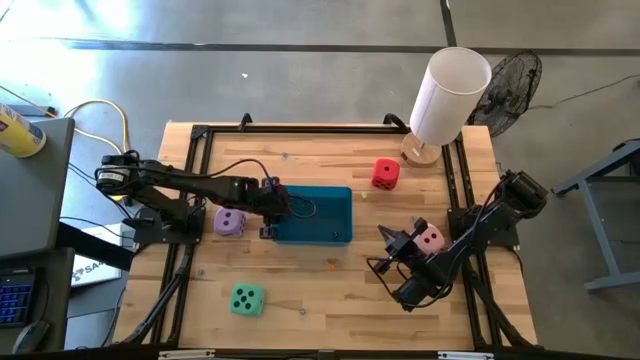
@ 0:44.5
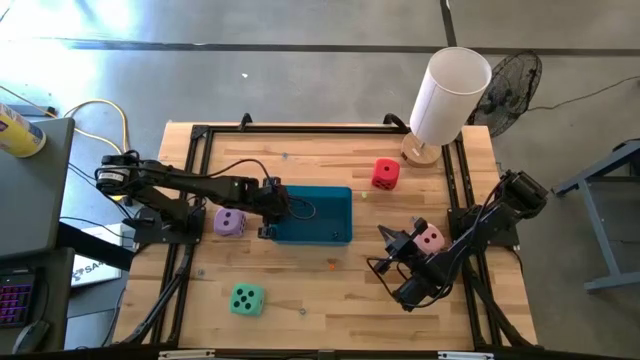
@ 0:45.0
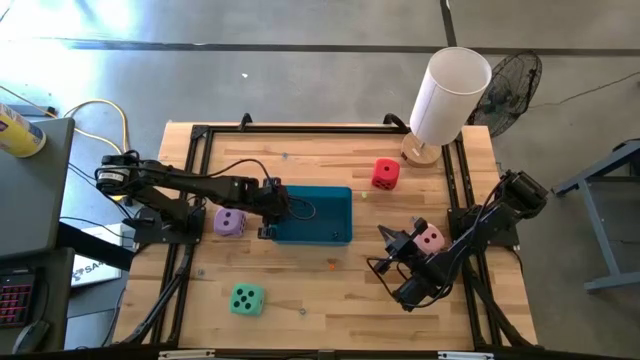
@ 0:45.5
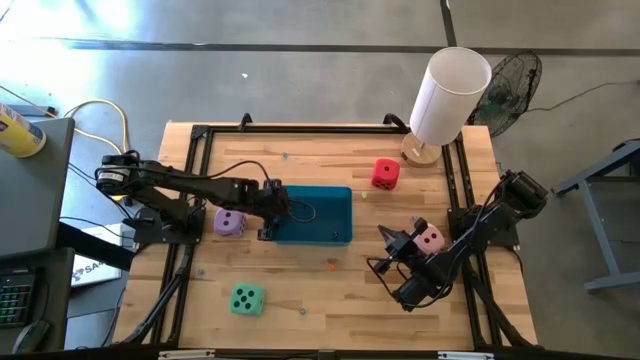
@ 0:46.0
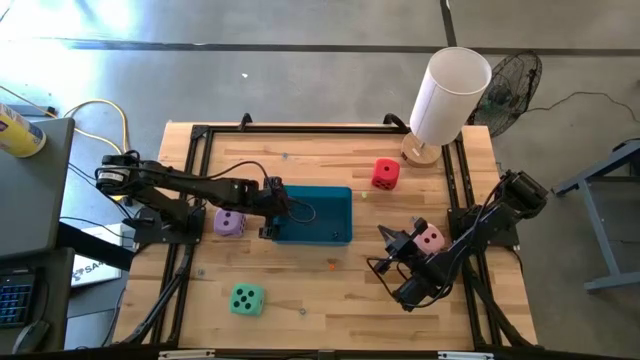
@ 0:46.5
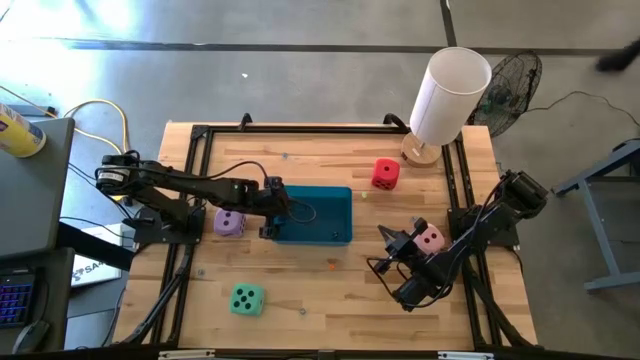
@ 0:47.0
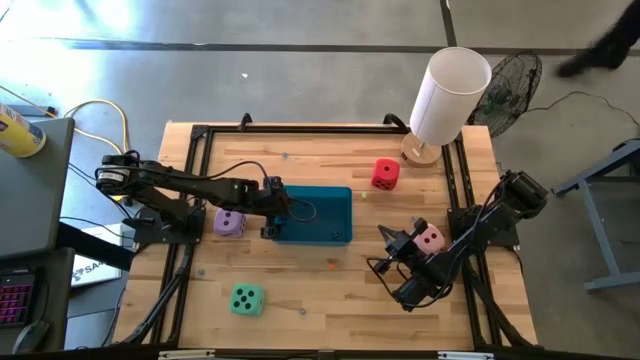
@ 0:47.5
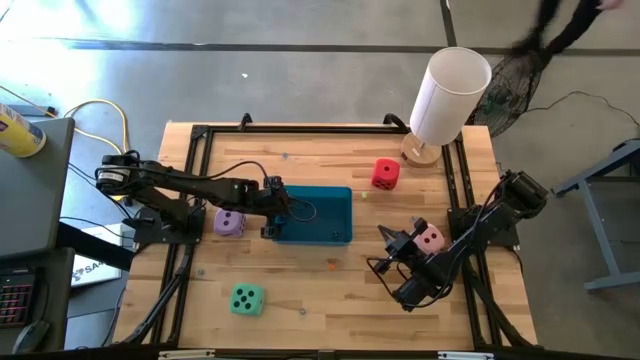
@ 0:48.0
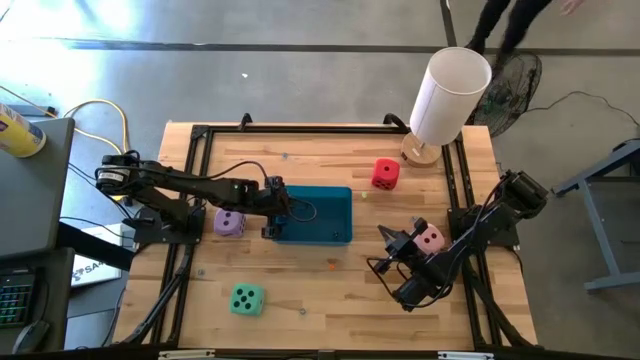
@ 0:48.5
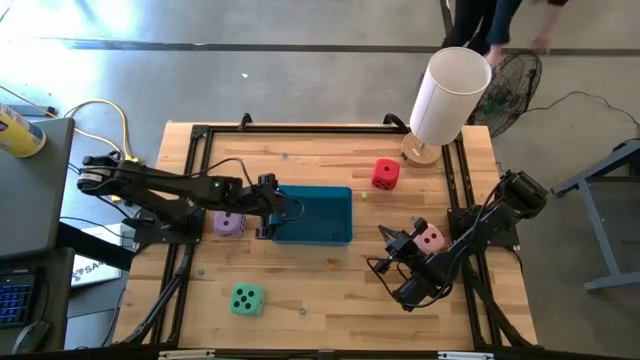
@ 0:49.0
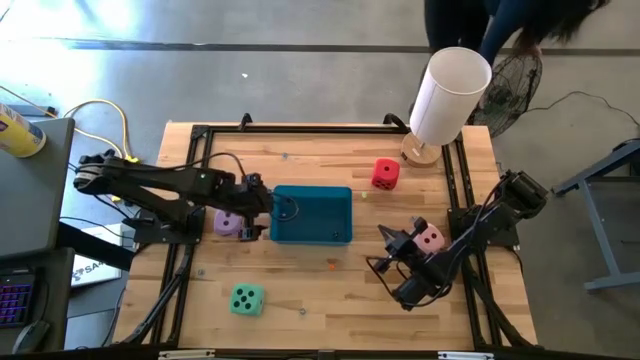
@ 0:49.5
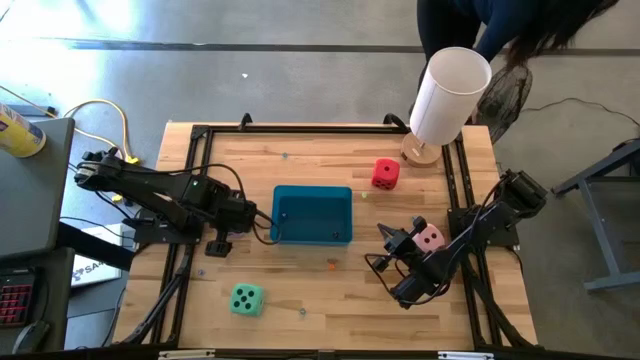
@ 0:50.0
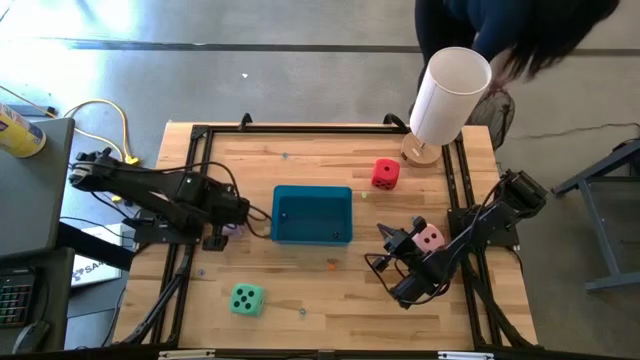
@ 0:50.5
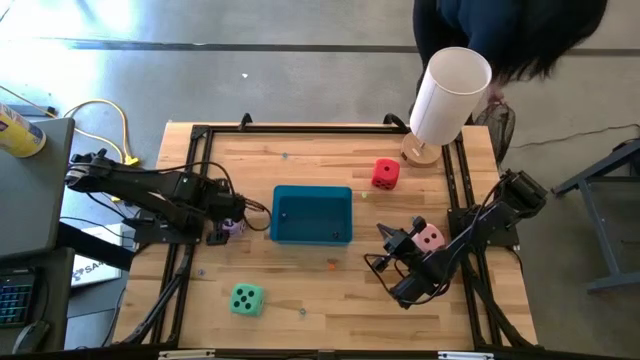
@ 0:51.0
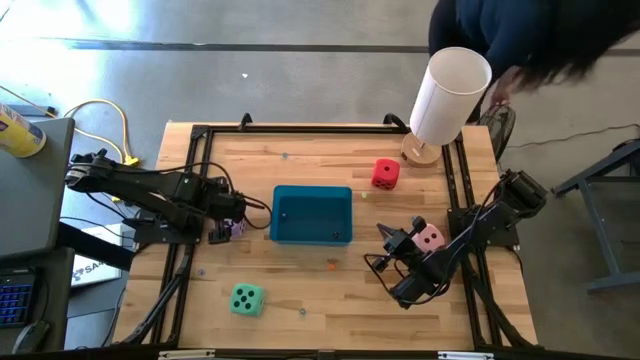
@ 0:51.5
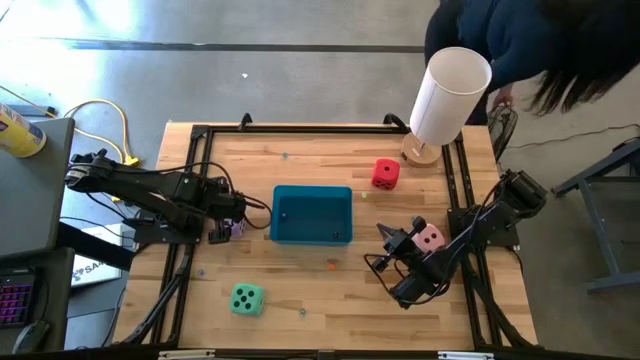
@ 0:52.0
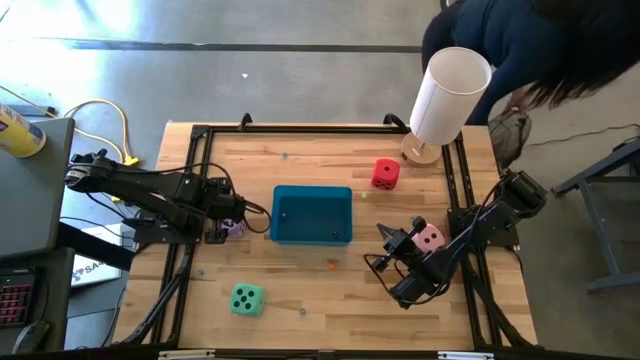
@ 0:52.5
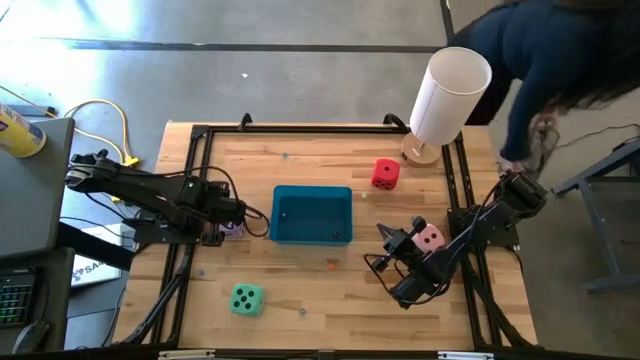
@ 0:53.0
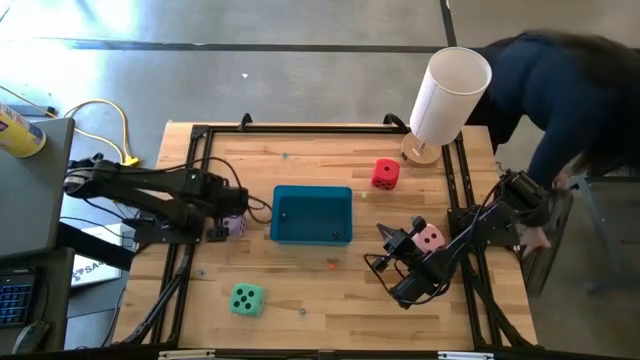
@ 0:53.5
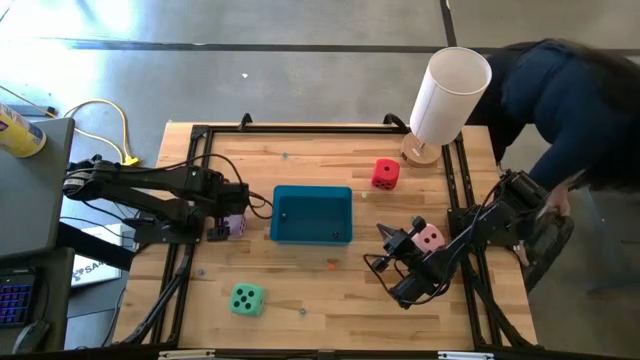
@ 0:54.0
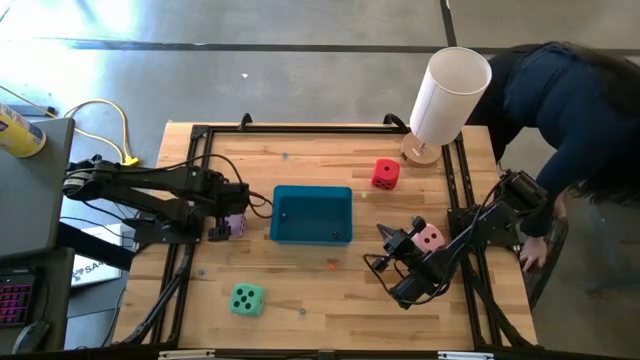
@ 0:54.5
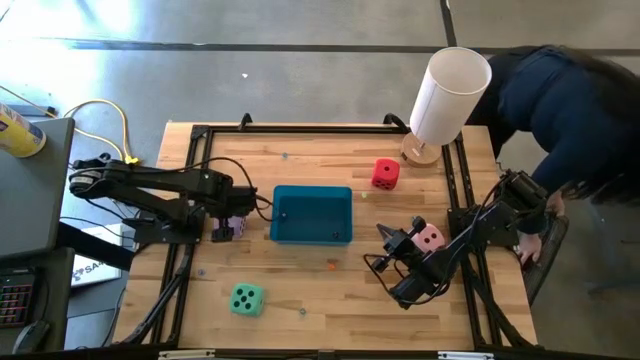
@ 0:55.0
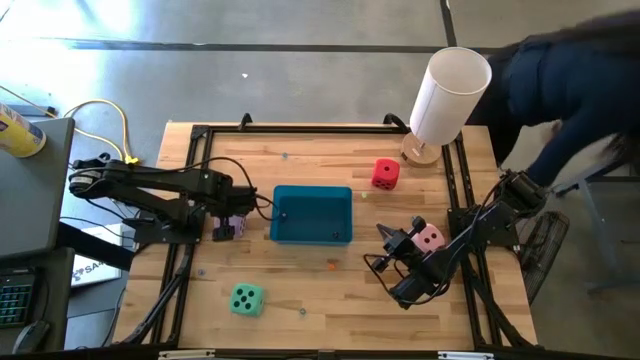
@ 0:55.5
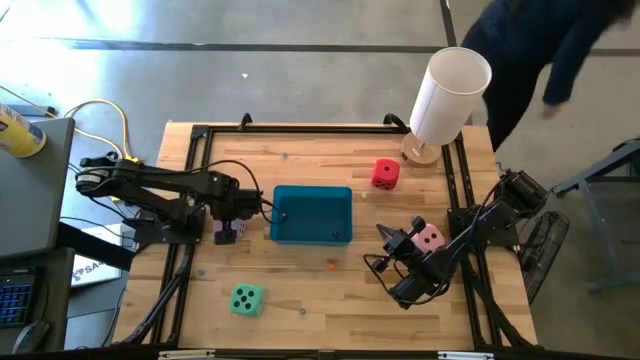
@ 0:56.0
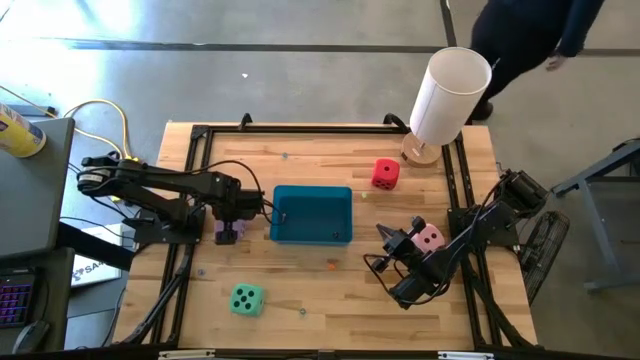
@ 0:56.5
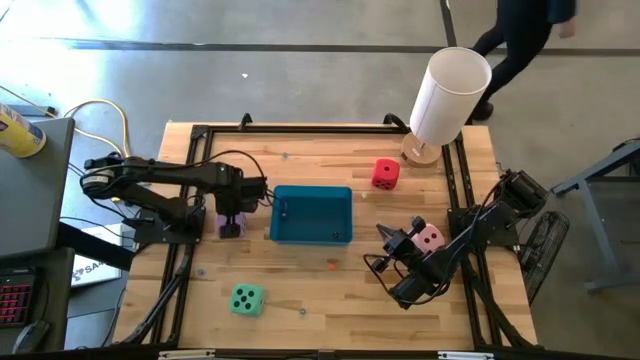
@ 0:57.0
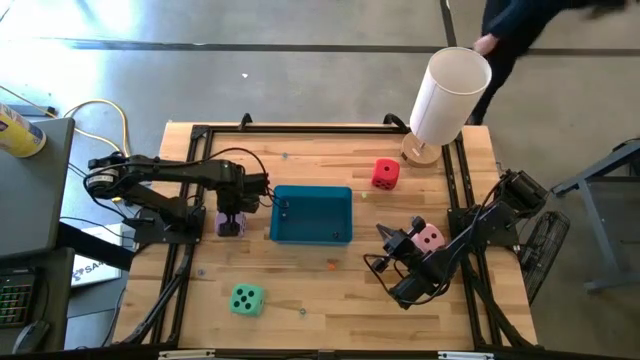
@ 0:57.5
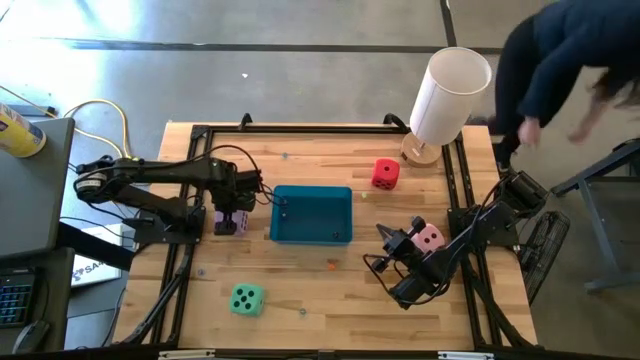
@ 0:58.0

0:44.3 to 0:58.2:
Task: Pick & Place Dice
Put the large violet dice into the blue bin

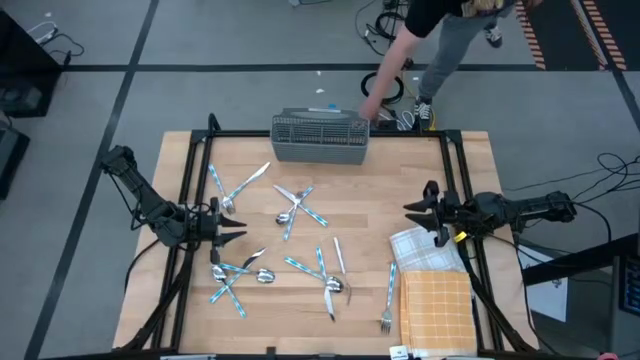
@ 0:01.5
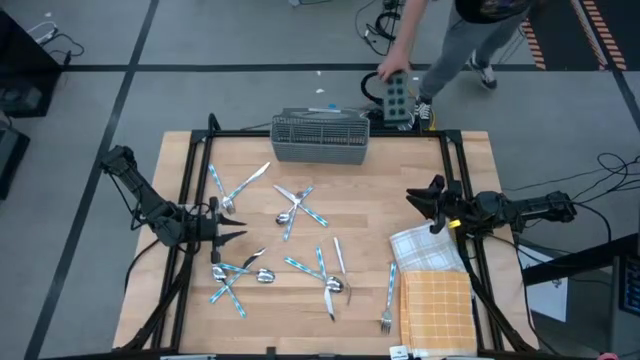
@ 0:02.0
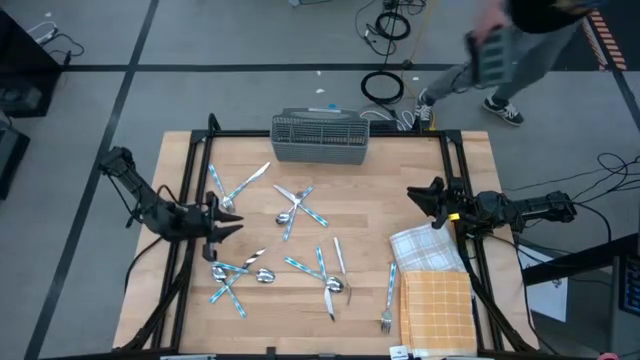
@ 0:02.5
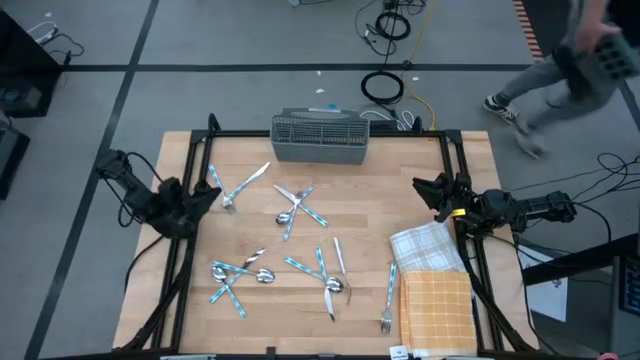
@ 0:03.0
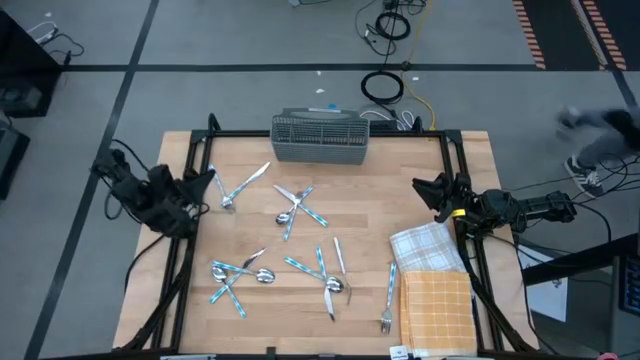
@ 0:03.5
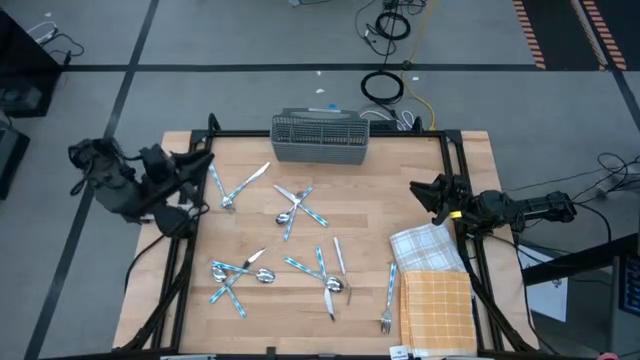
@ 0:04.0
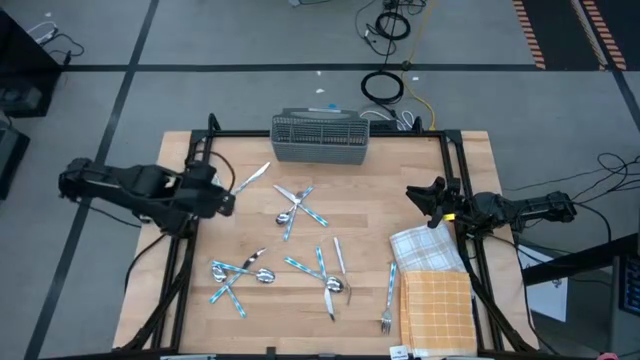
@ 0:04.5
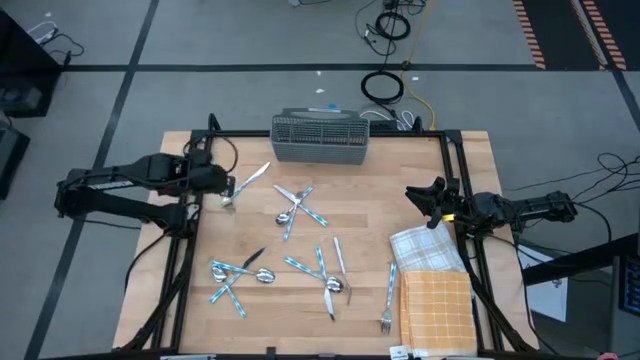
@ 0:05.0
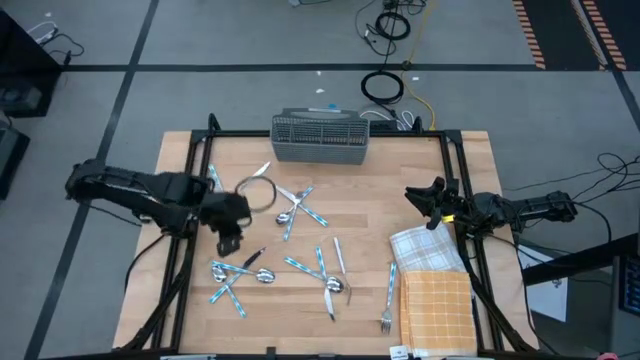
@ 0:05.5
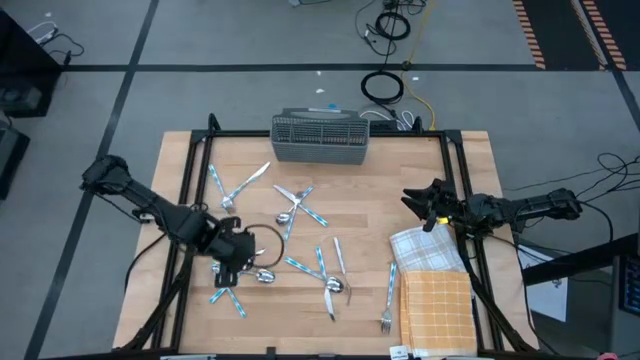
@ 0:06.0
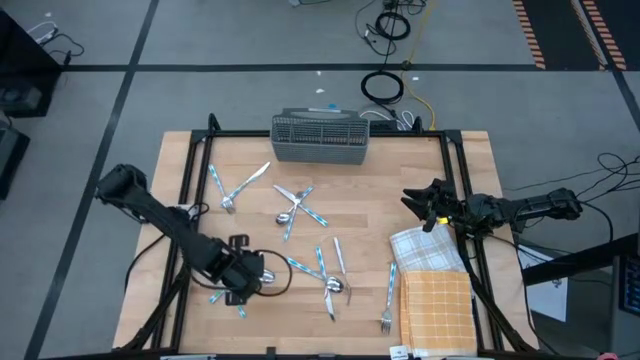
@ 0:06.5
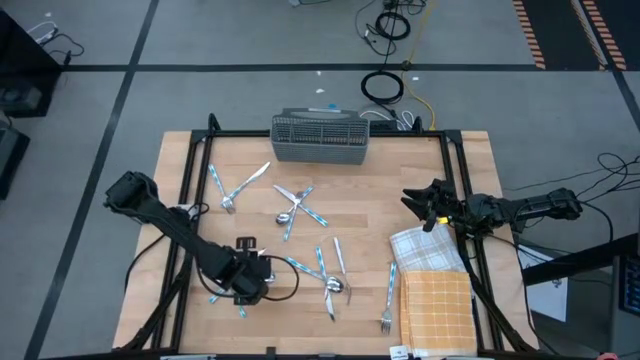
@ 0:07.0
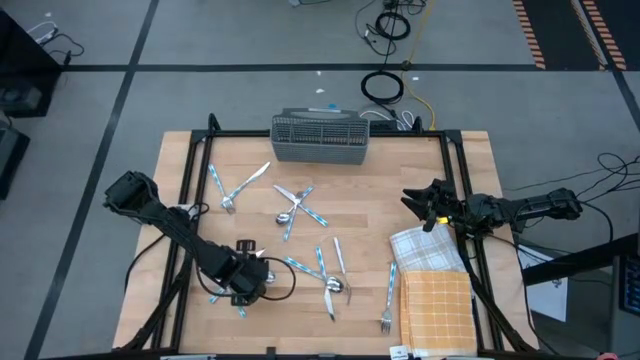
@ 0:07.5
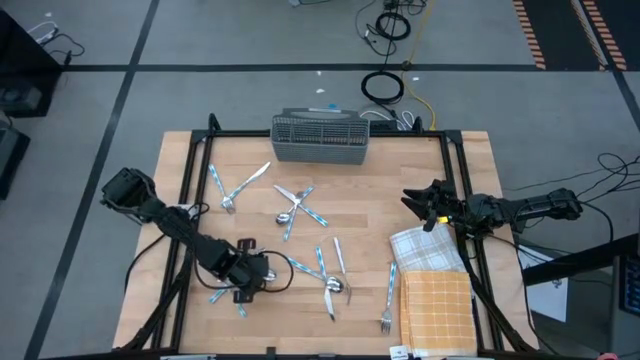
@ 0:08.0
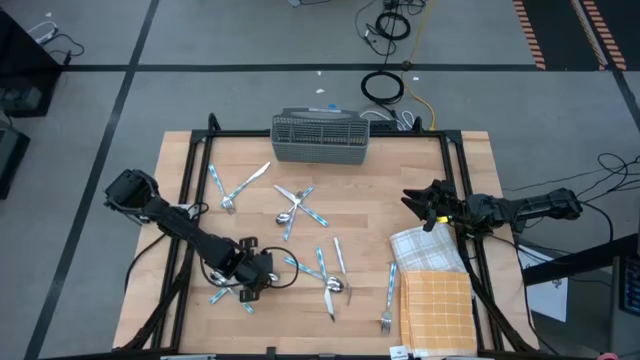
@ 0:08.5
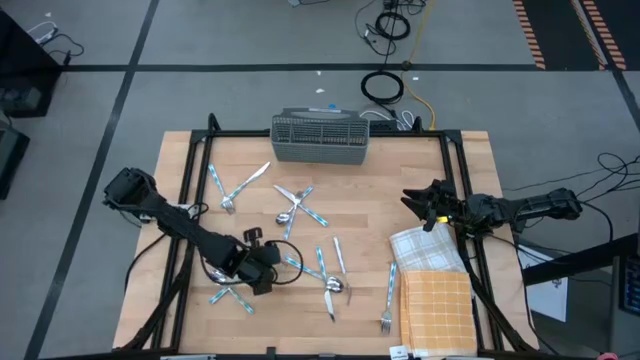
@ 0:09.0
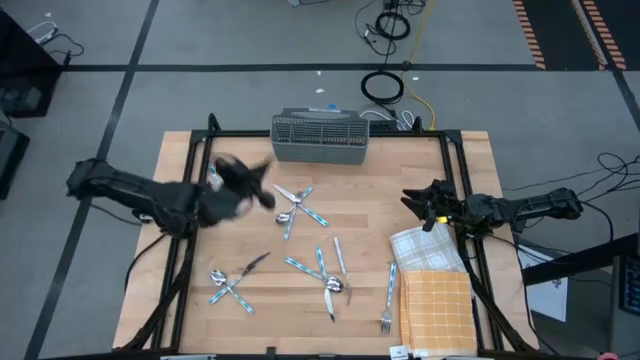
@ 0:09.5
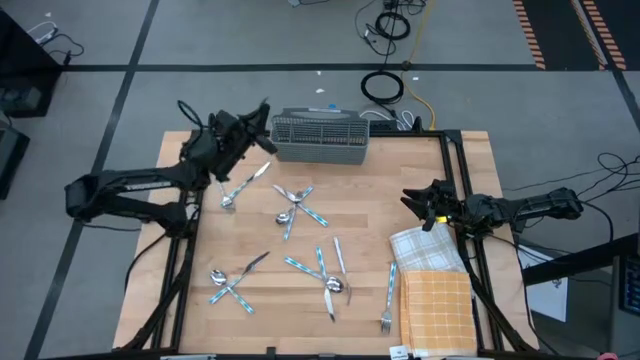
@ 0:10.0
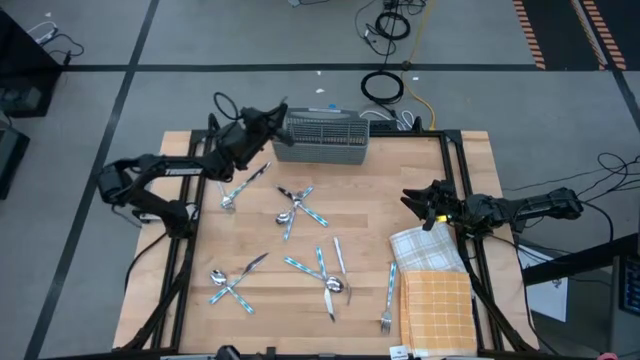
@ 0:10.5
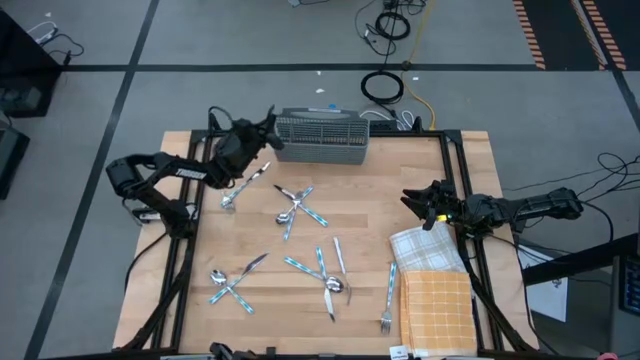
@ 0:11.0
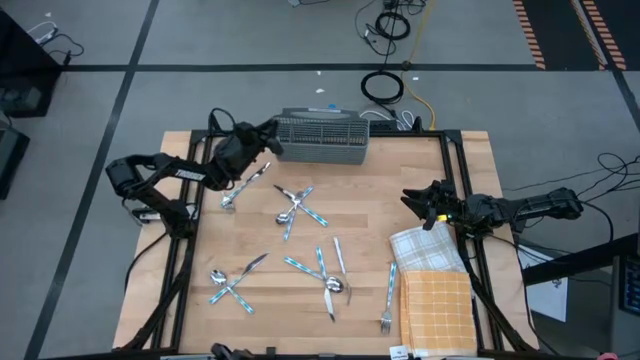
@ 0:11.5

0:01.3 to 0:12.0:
Task: Sort silverware
Put the bottom middle blue spoon into the gray silverware basket
